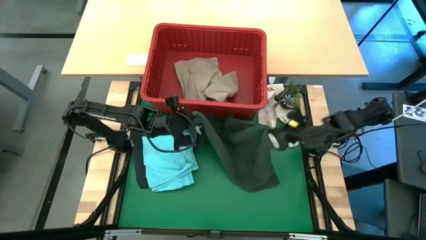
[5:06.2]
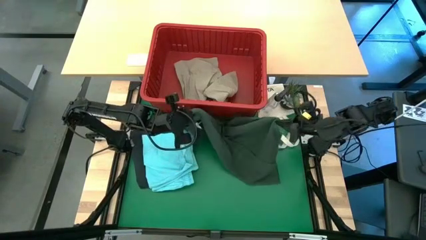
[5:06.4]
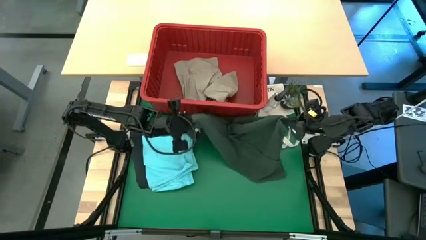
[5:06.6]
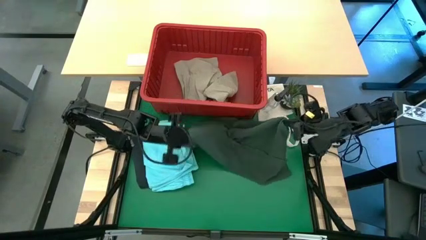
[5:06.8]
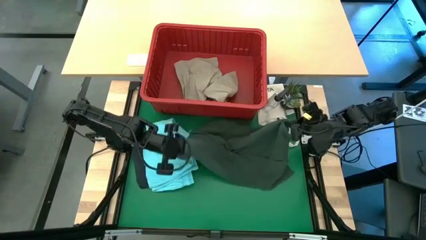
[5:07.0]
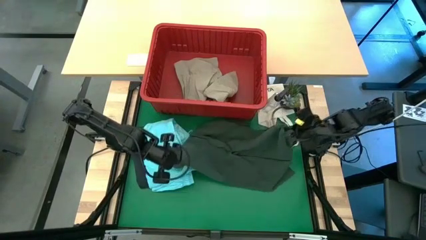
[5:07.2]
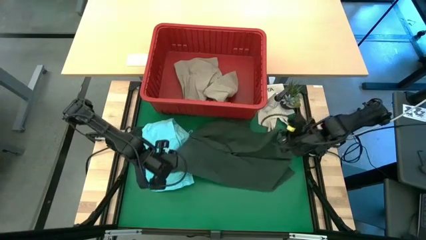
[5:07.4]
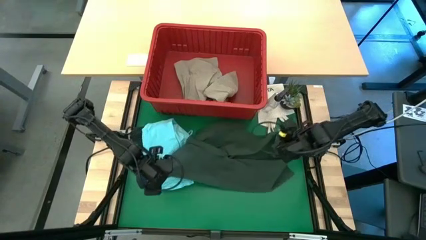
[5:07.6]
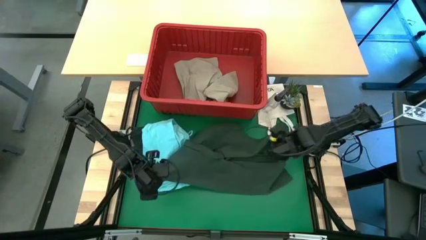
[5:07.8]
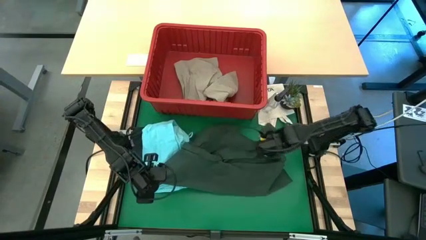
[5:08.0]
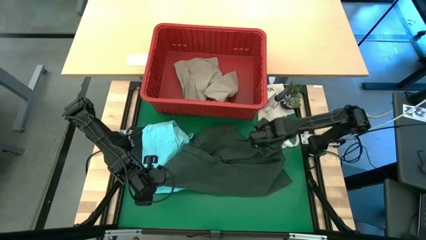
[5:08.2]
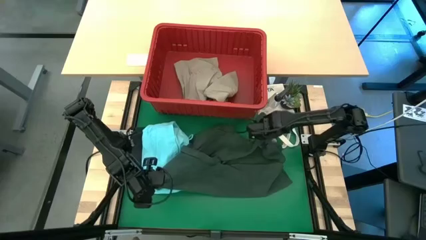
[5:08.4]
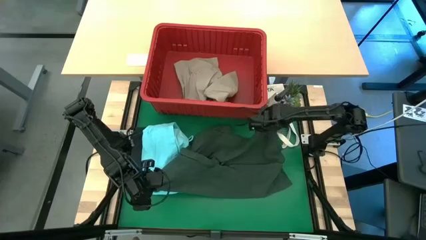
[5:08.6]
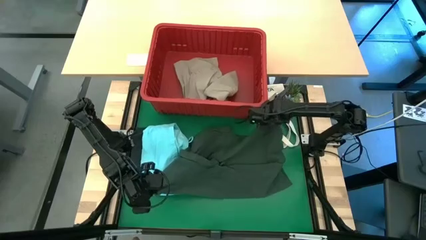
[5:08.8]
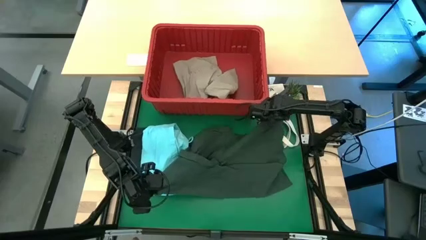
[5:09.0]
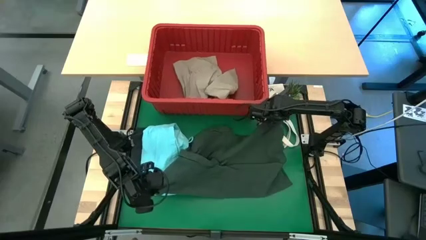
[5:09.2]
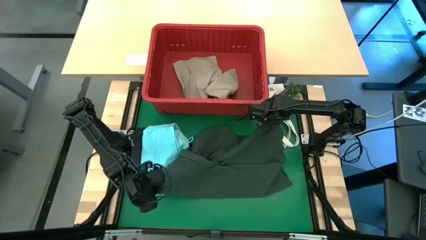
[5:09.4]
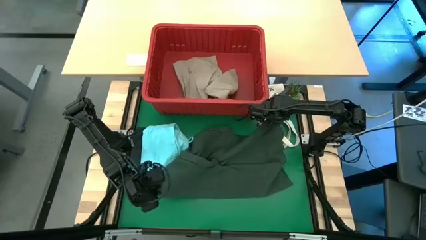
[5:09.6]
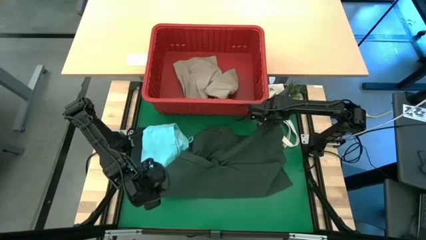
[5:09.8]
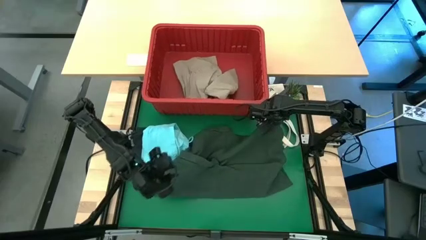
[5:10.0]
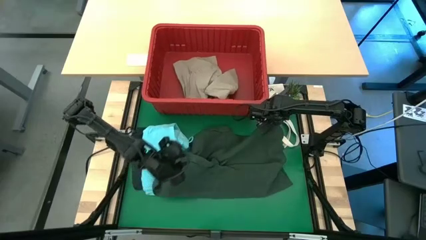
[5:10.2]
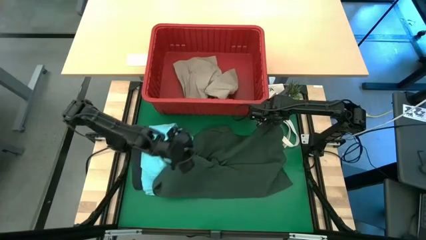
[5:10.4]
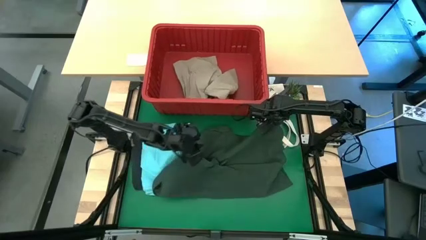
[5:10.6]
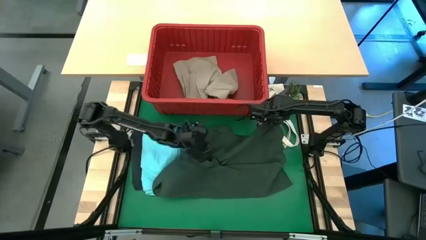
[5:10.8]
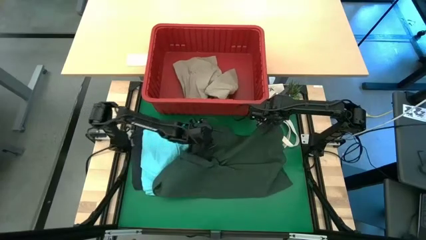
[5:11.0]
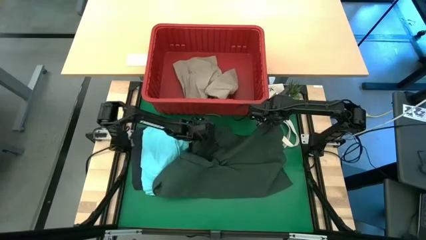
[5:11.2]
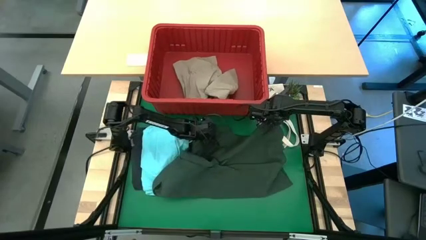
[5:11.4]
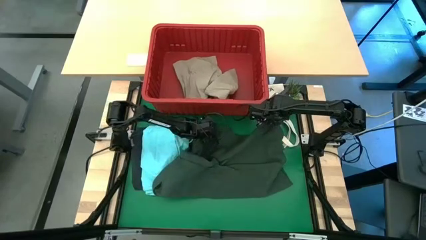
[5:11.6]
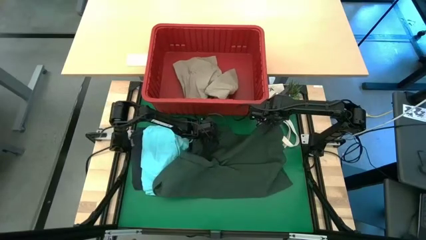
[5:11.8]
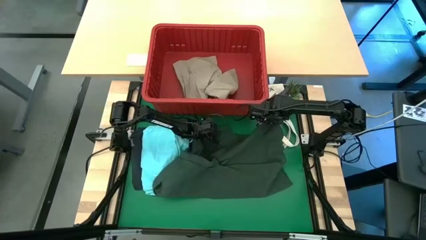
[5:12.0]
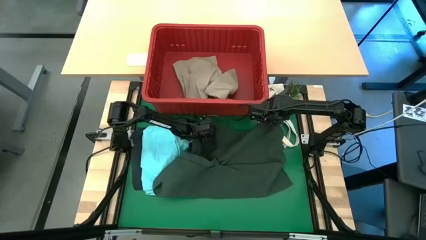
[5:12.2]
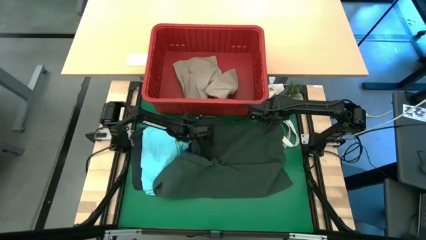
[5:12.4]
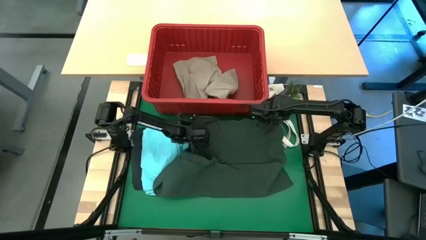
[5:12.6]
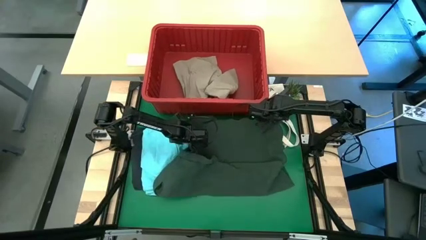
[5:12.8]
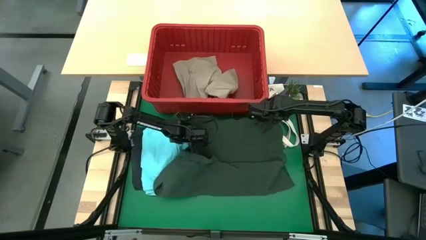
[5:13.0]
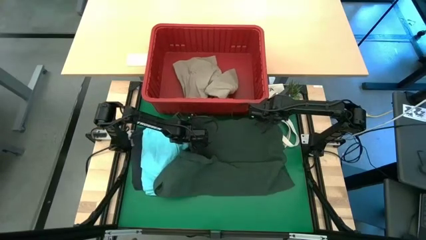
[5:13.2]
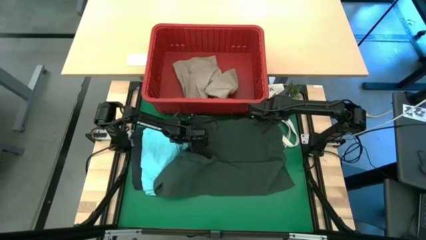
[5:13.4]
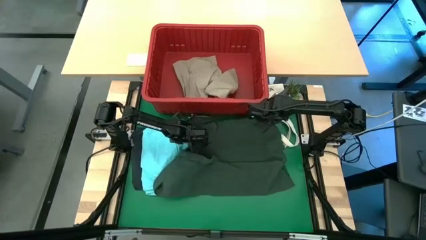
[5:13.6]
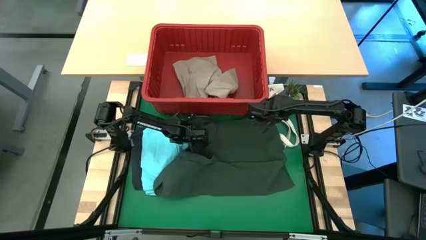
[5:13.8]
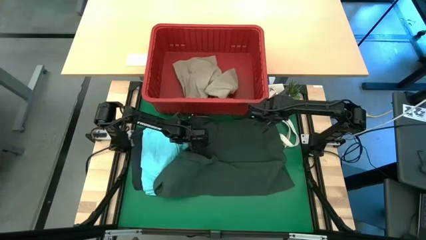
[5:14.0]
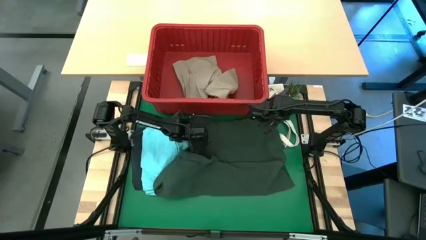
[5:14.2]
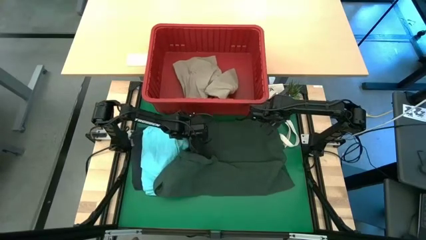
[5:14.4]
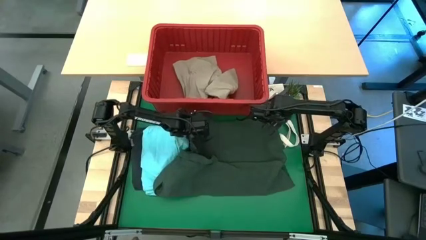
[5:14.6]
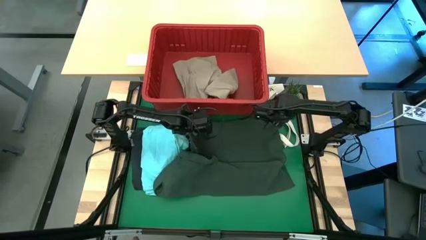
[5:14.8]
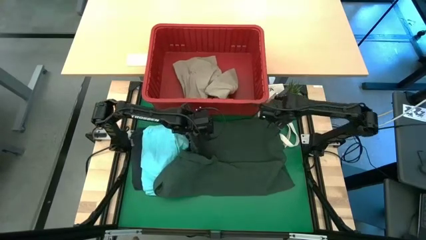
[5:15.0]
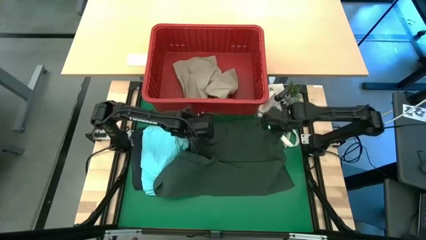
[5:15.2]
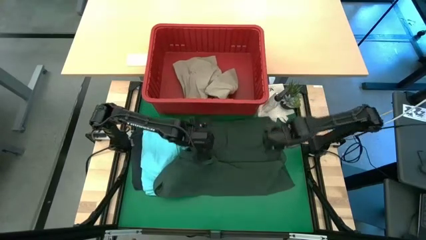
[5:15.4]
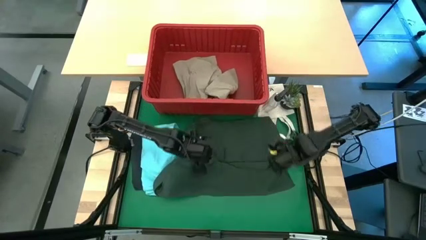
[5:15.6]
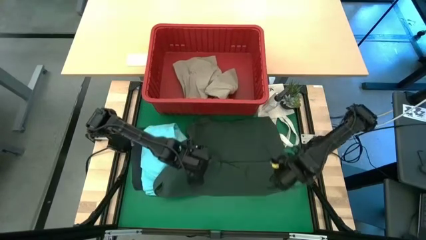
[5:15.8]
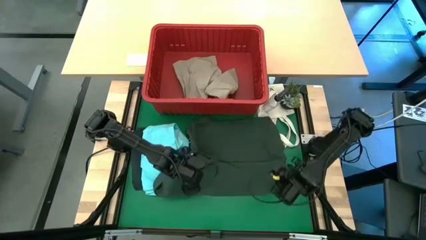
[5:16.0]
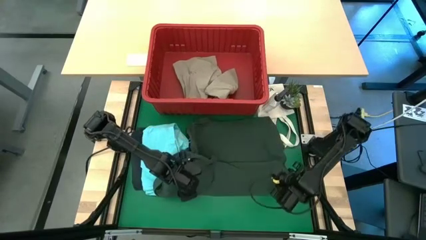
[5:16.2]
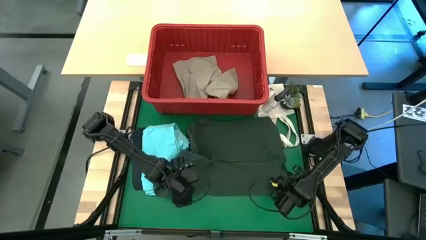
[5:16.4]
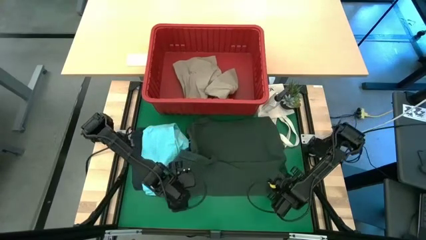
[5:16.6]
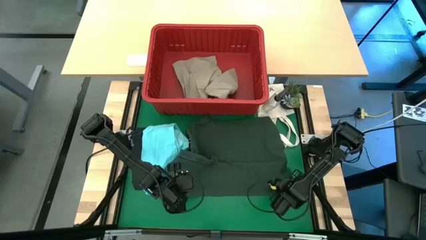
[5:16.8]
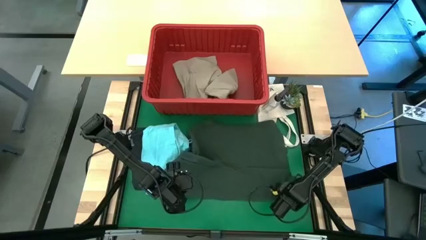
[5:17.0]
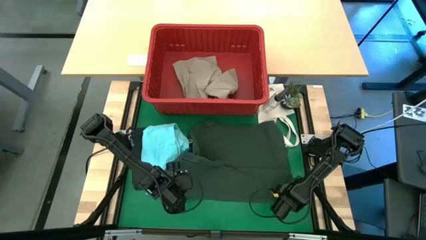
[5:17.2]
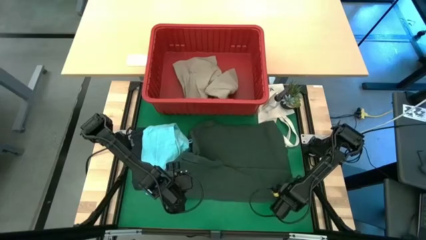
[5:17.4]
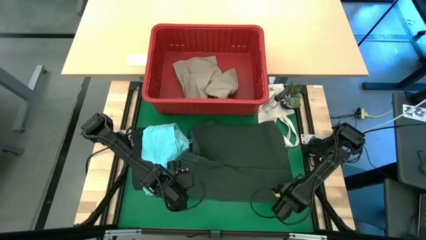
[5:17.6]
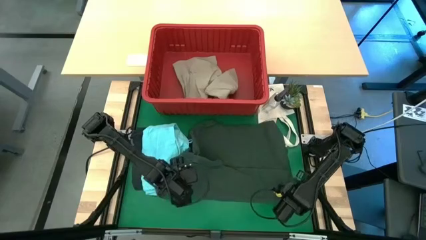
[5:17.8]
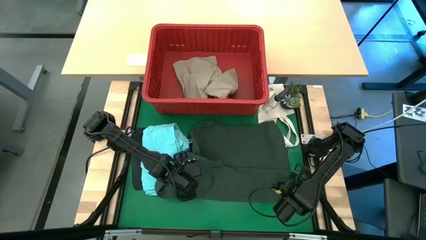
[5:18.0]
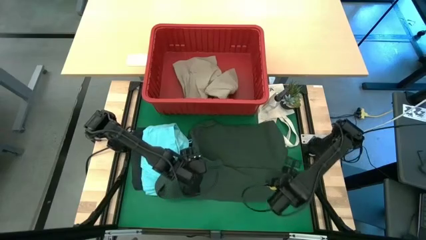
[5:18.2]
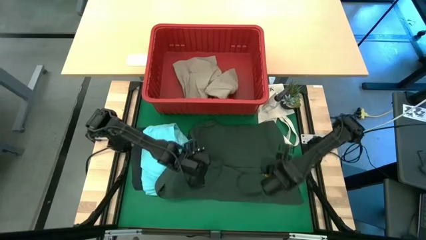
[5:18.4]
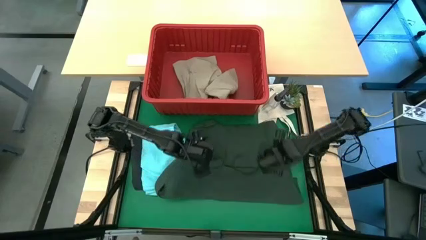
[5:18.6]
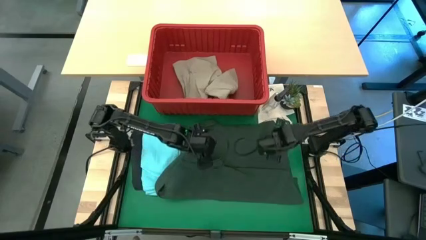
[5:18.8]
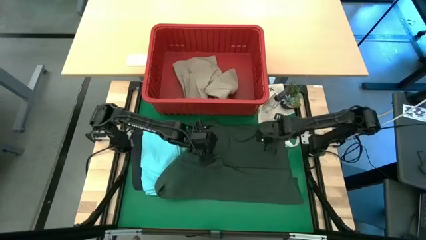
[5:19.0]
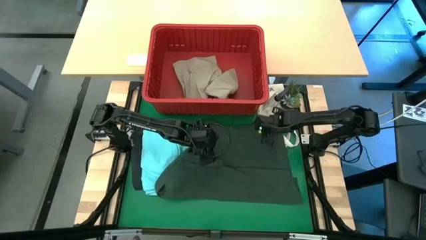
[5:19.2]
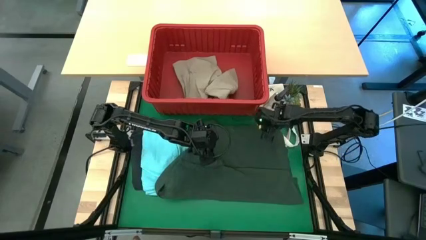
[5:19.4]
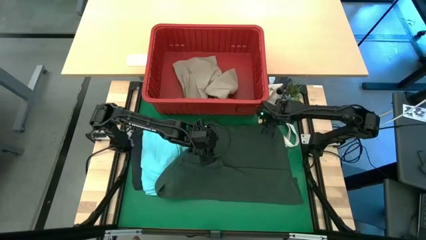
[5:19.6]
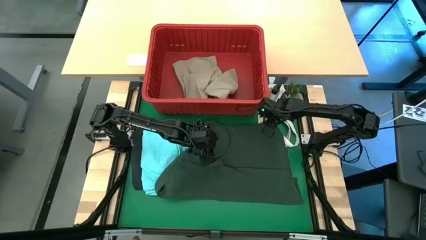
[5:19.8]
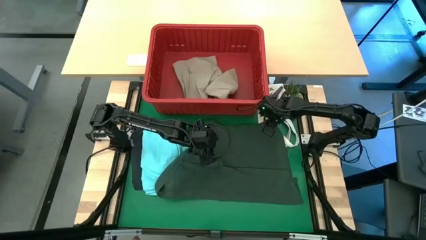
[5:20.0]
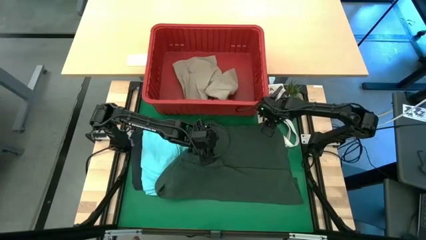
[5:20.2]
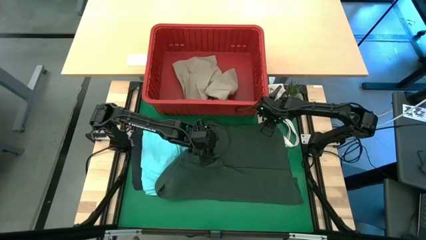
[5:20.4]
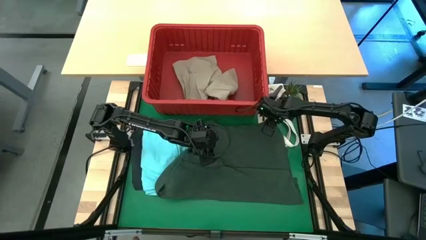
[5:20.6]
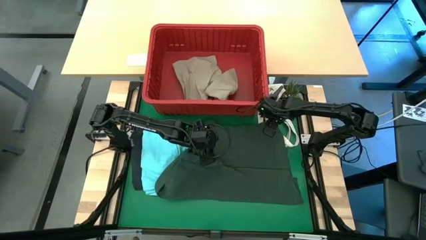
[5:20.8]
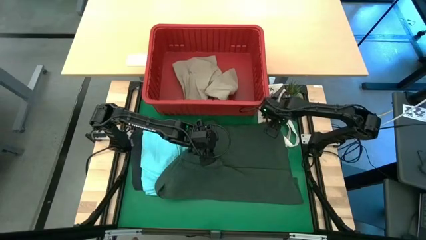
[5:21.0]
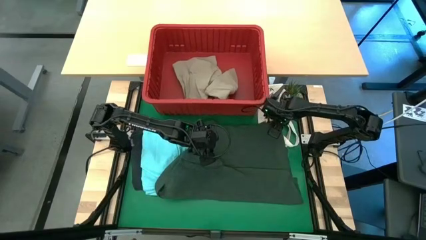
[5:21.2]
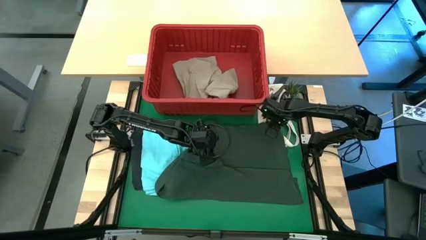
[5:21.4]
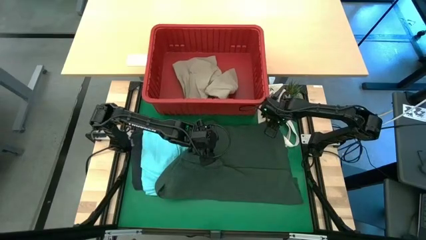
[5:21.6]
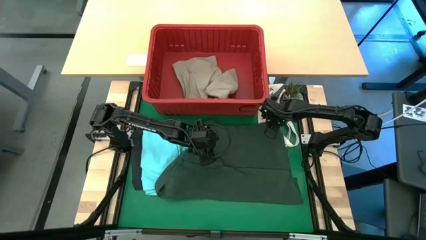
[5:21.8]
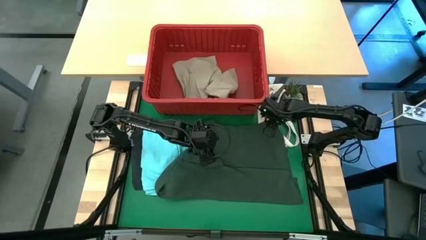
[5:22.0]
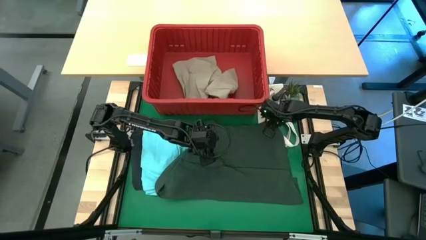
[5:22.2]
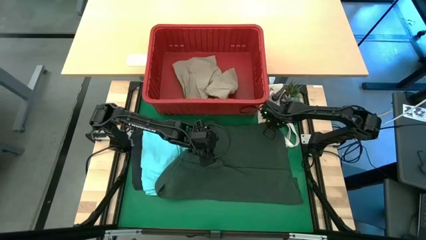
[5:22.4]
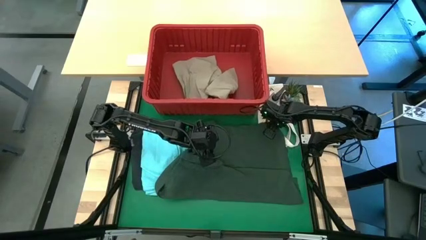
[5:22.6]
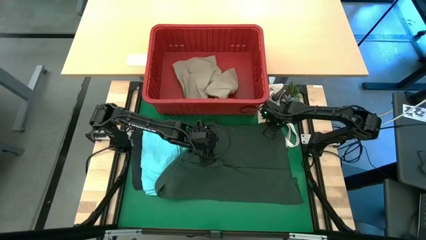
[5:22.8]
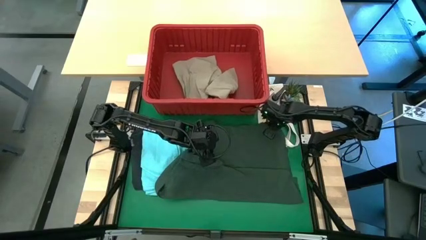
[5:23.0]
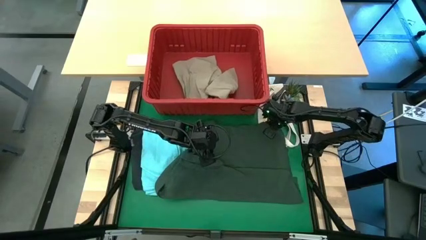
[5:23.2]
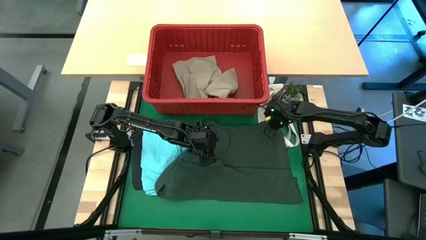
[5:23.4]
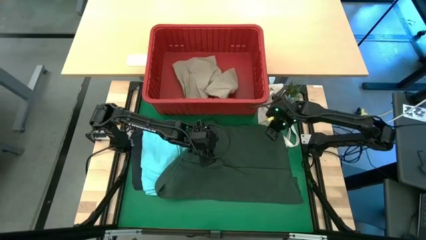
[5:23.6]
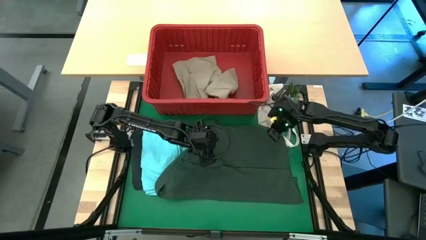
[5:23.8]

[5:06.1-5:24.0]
Task: Fold Laundry from Bin
Fold the green polo shirt from the red laundry bin
